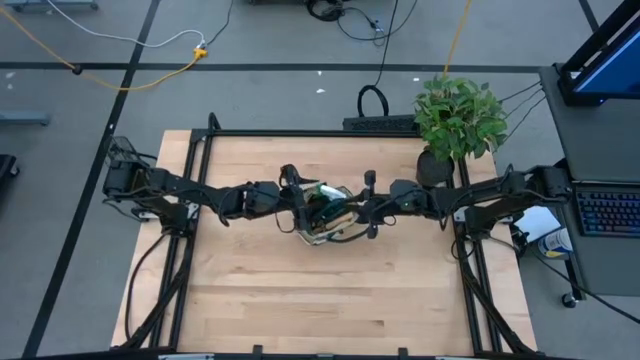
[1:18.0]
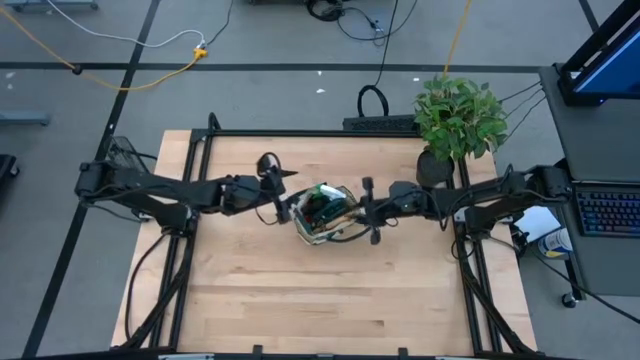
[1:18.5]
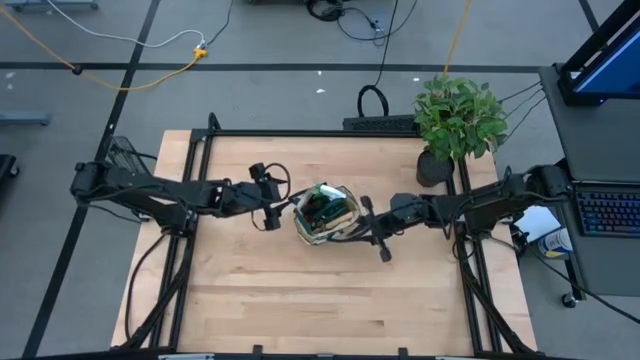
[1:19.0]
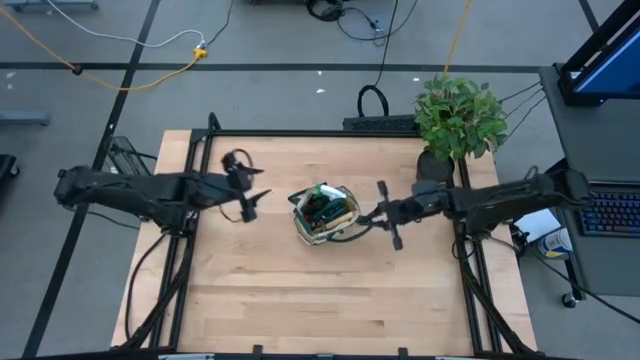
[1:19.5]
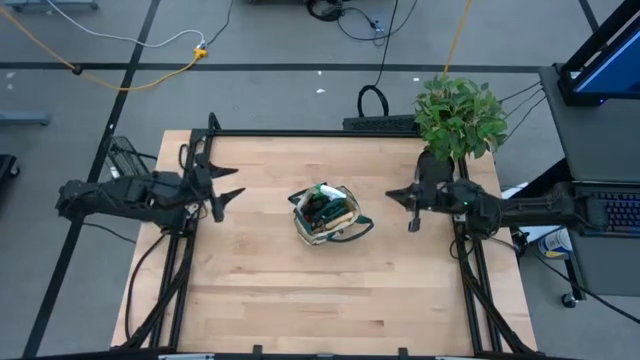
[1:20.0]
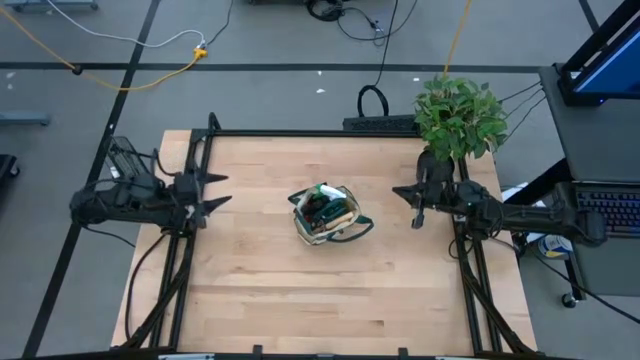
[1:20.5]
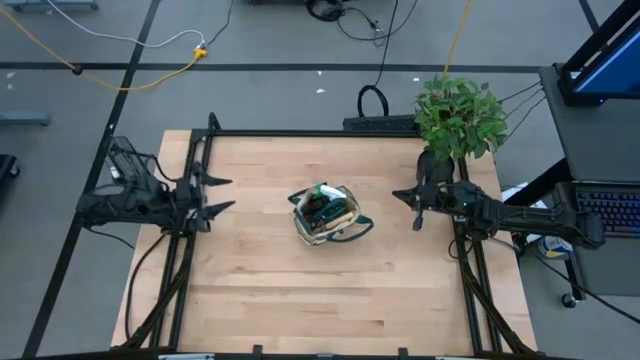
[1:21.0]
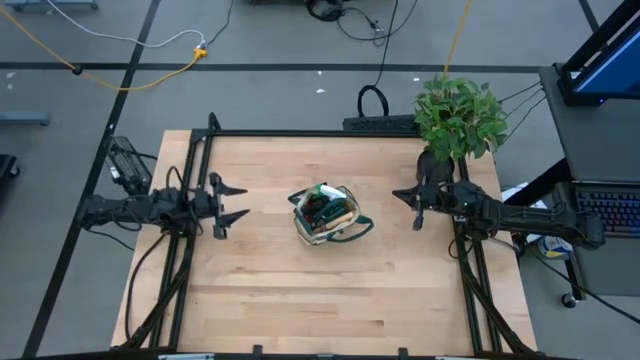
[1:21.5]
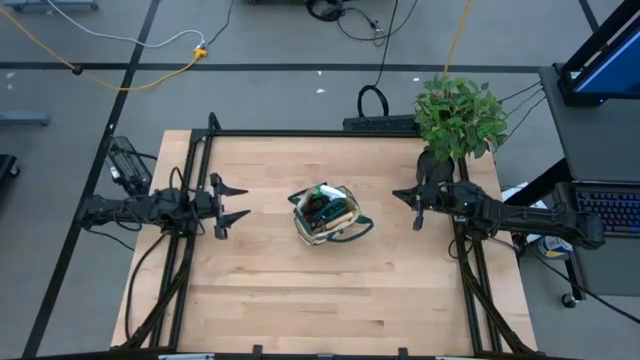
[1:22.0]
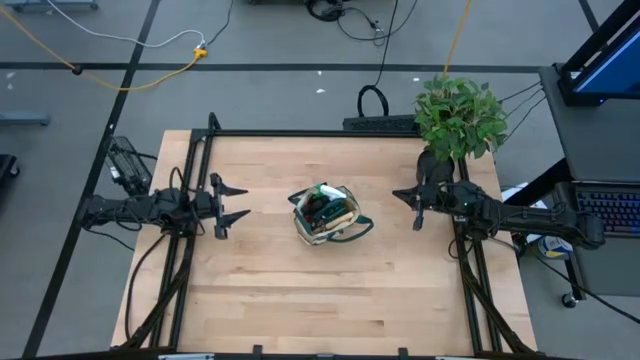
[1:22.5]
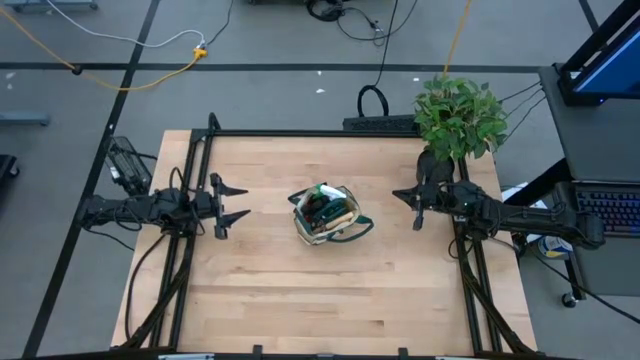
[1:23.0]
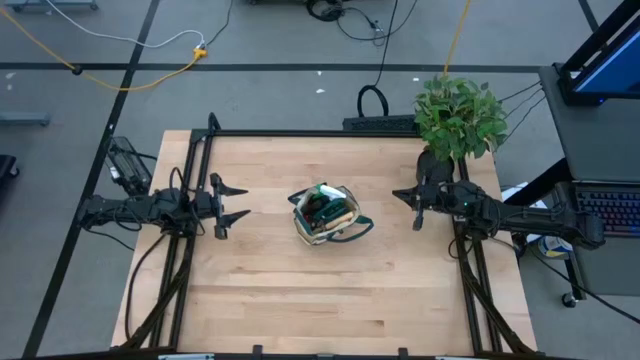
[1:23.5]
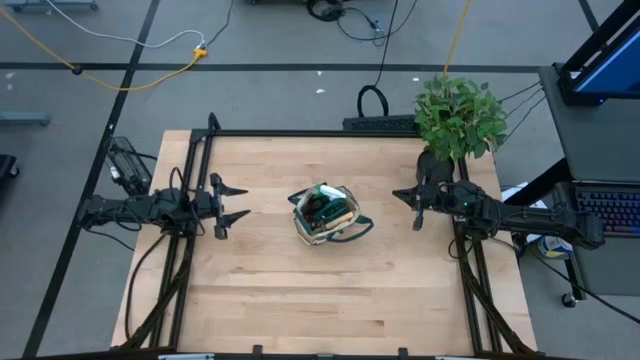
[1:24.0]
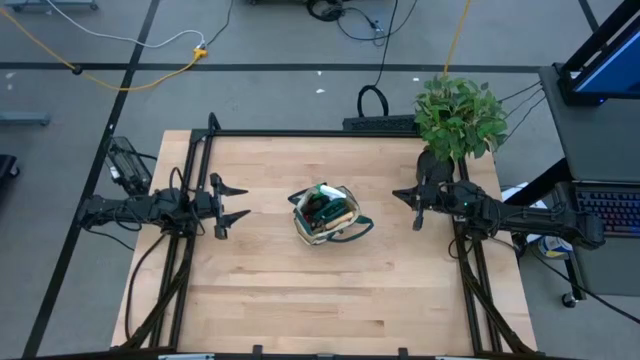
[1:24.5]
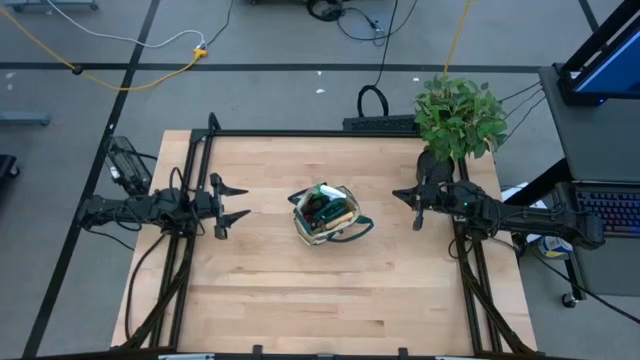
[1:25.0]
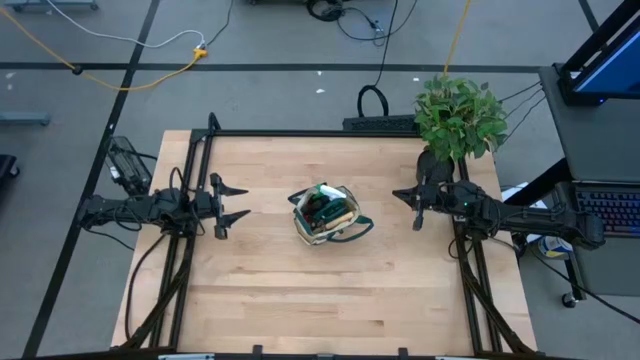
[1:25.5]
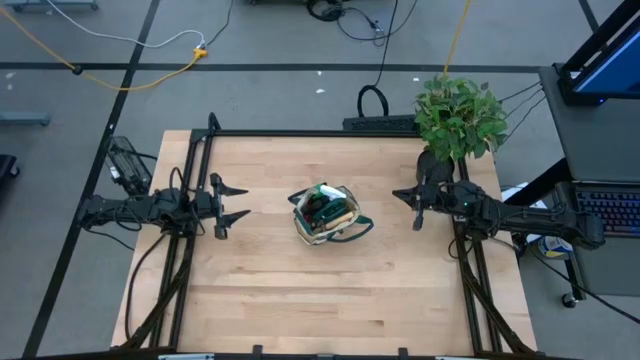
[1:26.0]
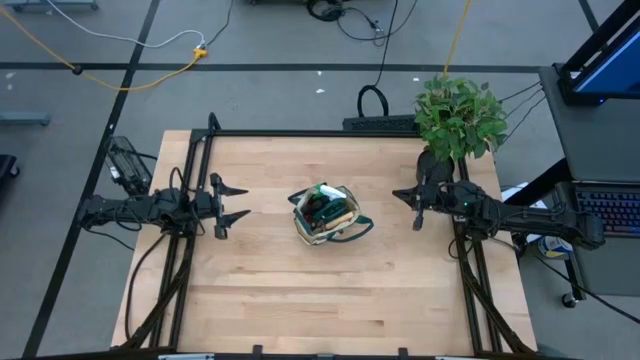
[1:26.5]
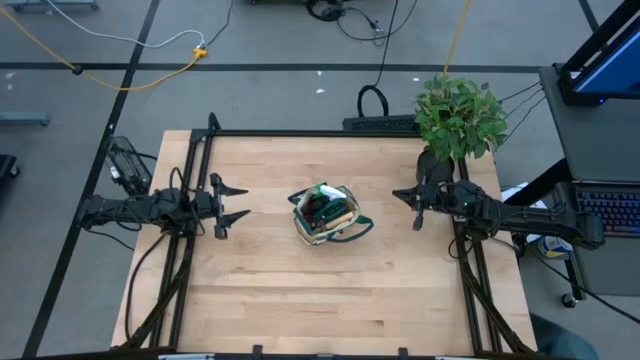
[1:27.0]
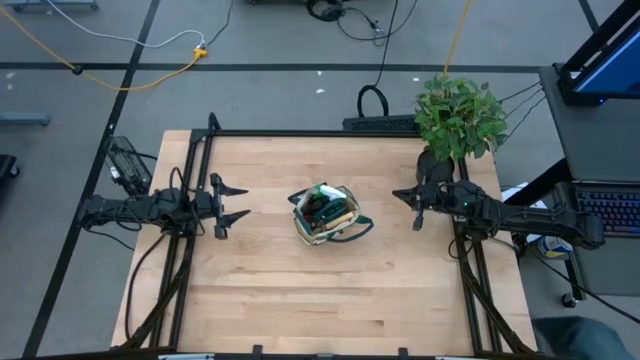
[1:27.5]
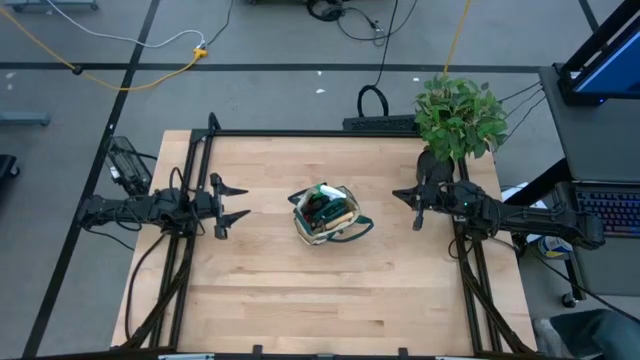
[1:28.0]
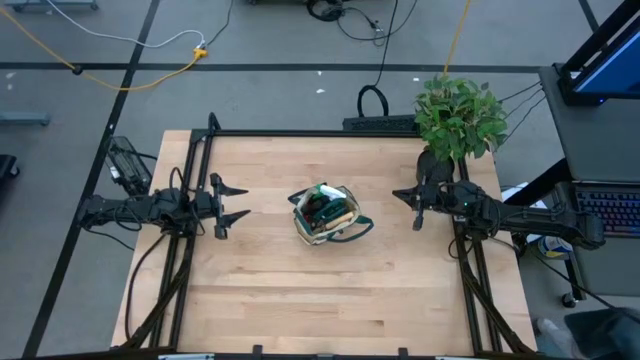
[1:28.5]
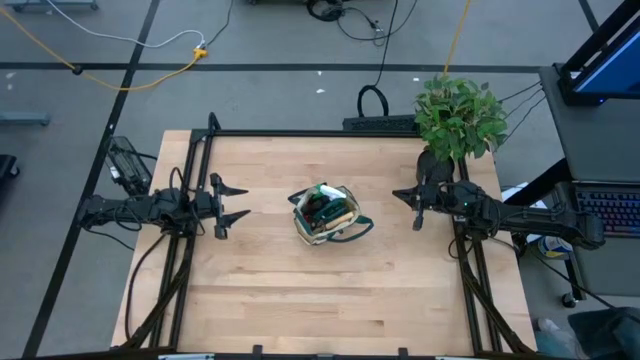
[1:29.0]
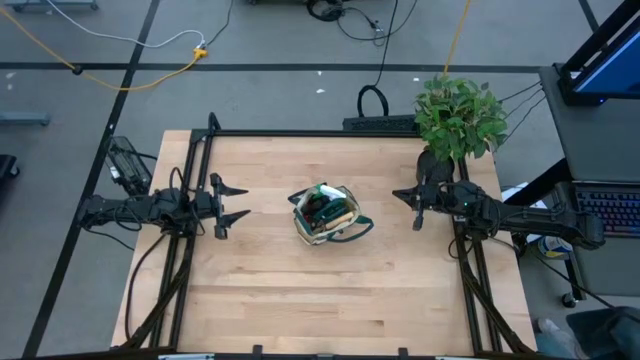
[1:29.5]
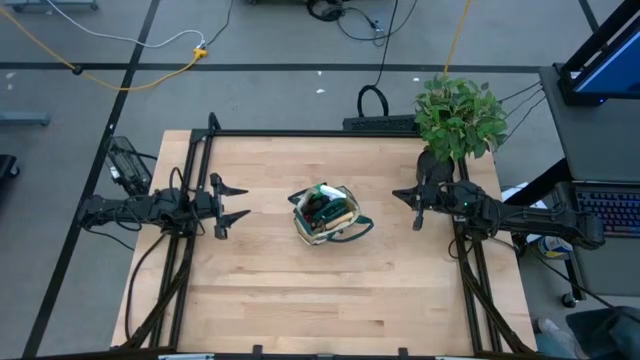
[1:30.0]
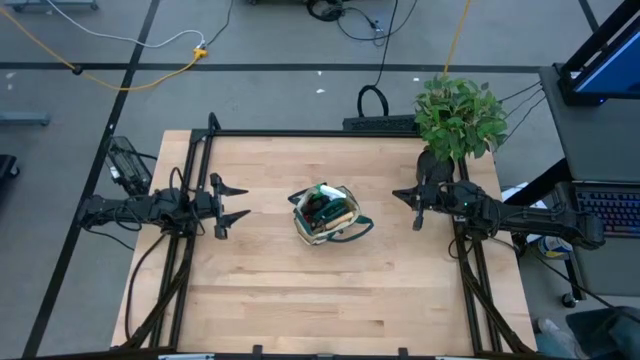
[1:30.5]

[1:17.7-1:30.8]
Task: Pick & Place Garden tools in Gardening bag
Return to Home Position

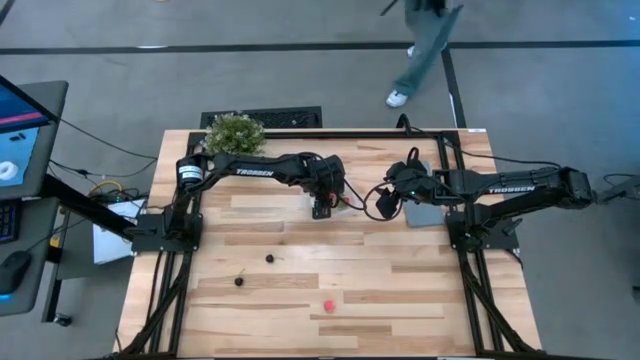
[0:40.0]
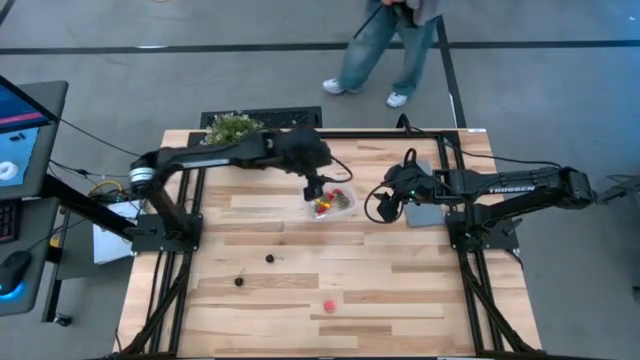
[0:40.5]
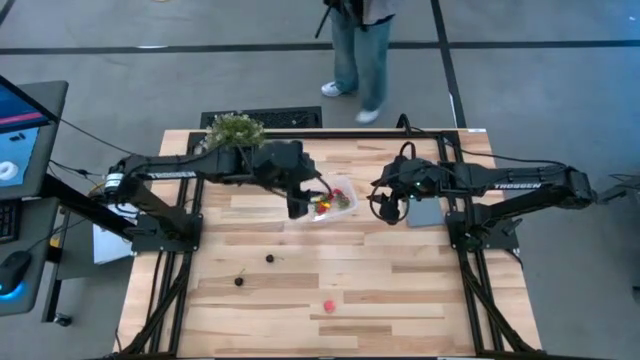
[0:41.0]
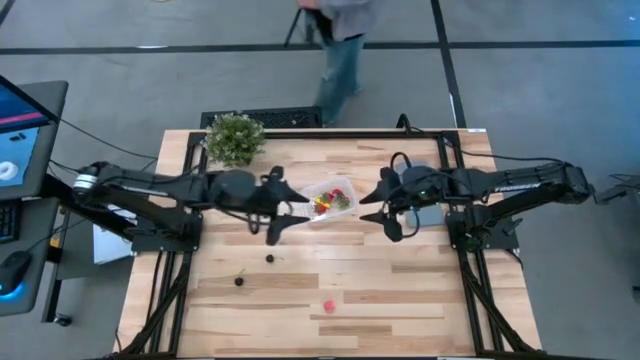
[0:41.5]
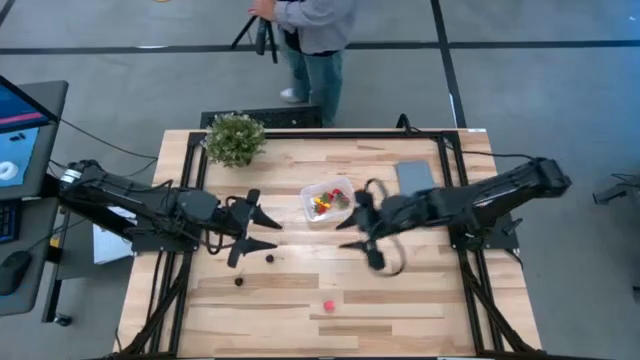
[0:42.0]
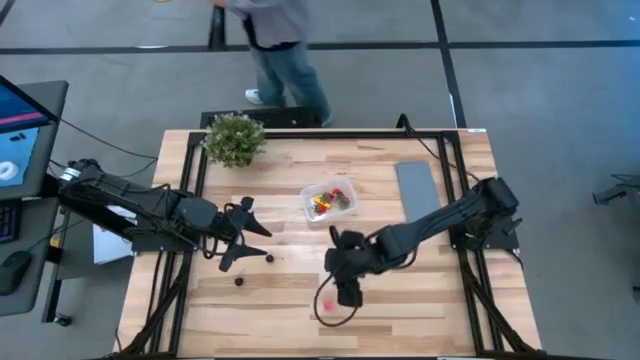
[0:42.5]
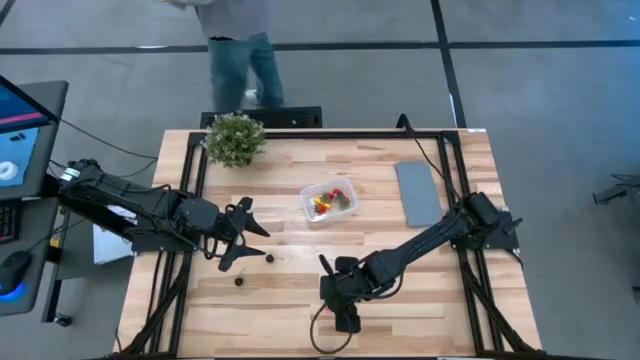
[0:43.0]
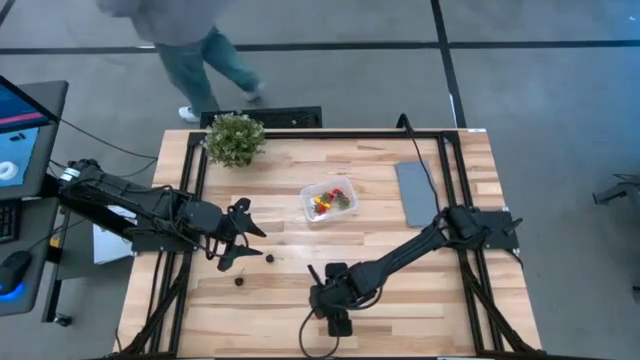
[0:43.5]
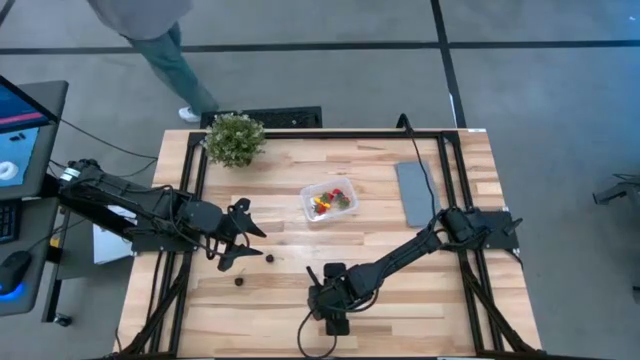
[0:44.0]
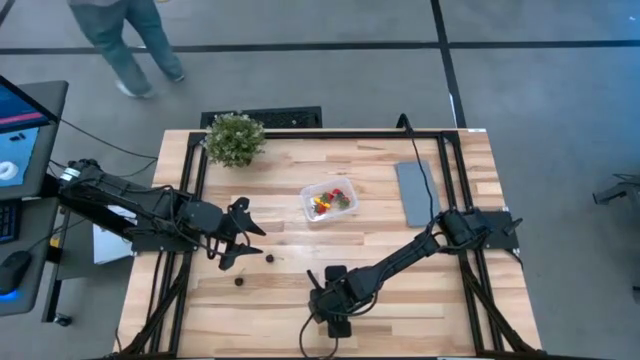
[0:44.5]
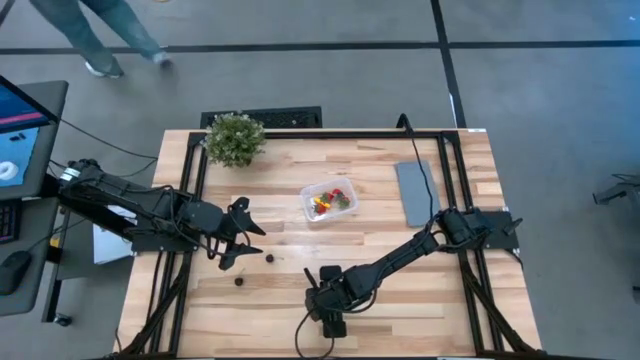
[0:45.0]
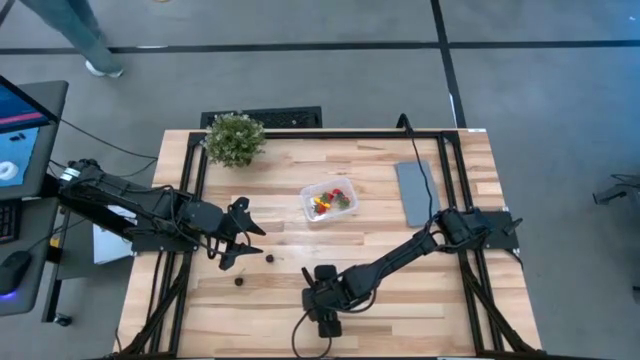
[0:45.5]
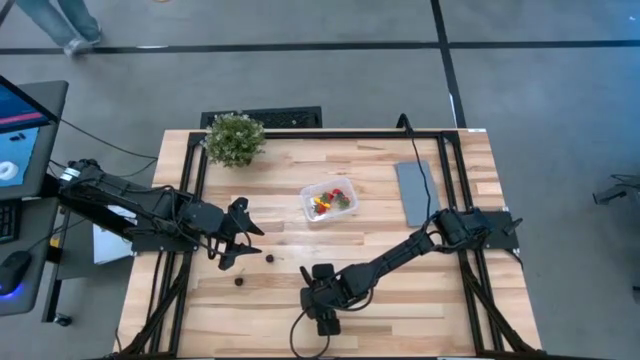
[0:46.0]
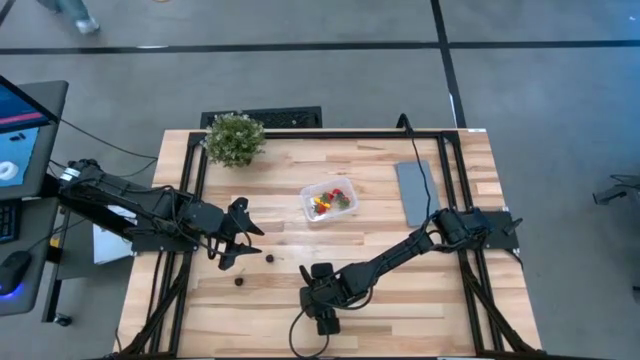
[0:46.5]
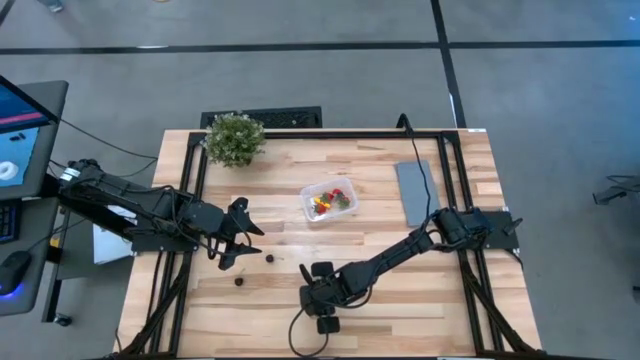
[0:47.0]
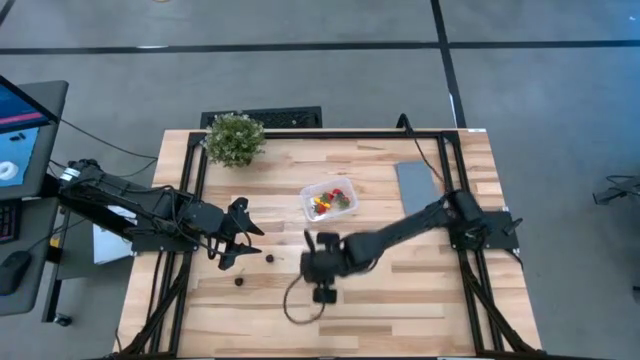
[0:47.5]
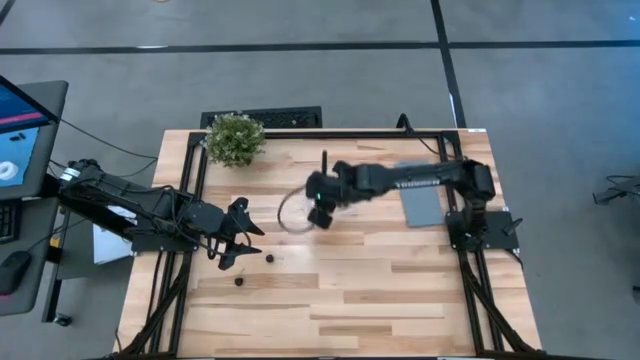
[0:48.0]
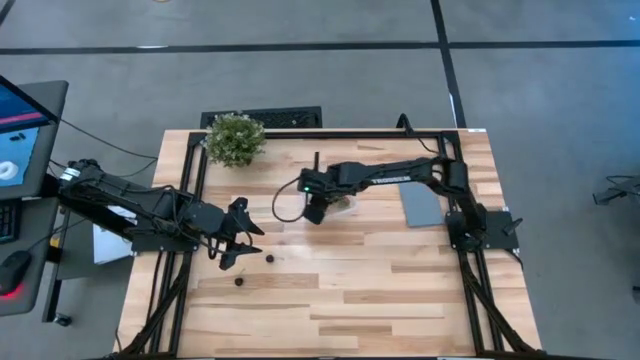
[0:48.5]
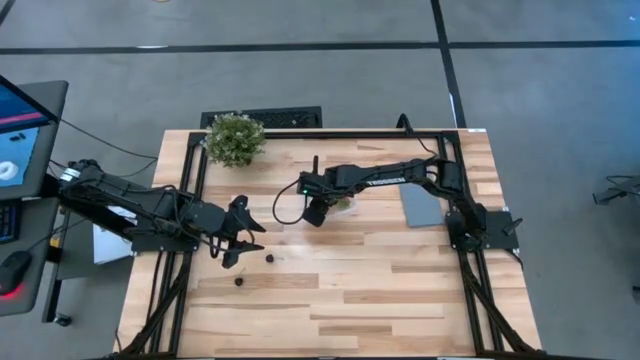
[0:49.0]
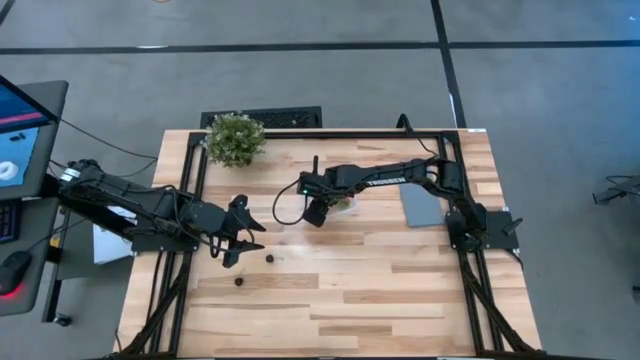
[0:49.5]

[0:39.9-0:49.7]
Task: Pick and placing Produce into tupperware
Put the peach into the transparent bin
